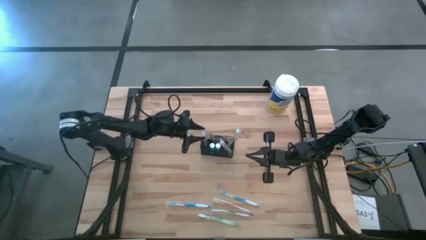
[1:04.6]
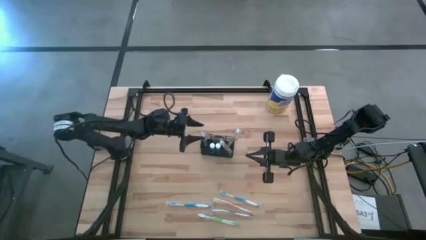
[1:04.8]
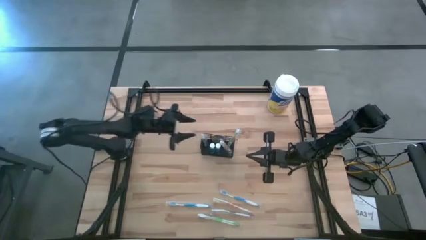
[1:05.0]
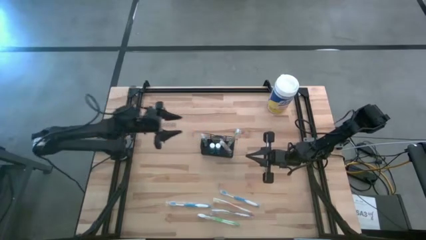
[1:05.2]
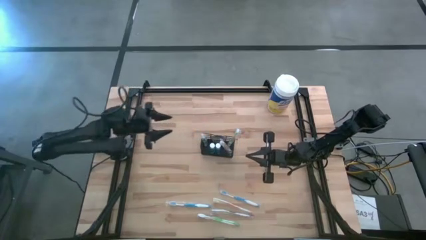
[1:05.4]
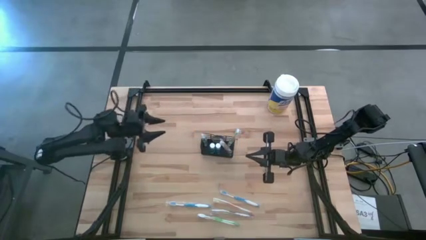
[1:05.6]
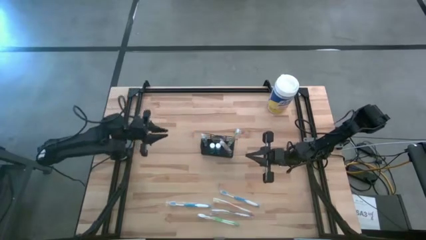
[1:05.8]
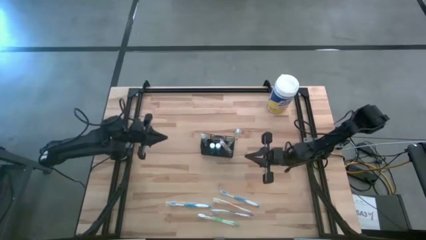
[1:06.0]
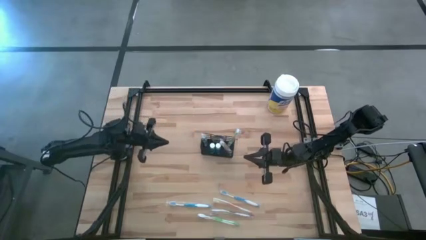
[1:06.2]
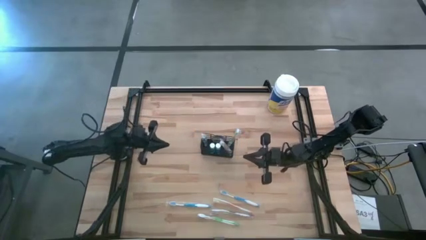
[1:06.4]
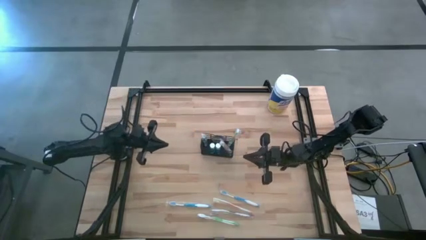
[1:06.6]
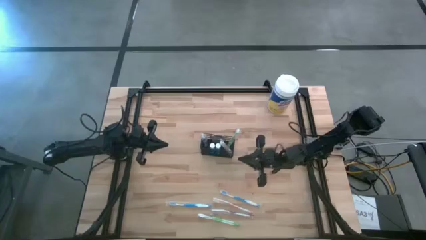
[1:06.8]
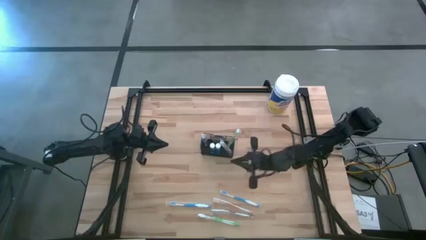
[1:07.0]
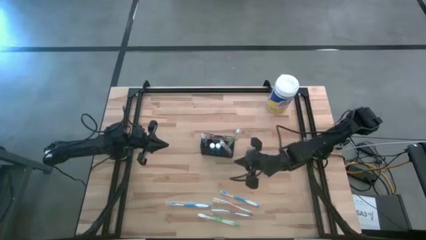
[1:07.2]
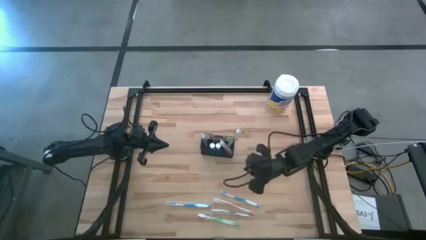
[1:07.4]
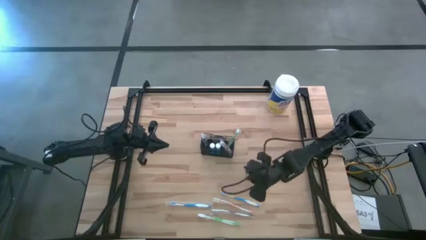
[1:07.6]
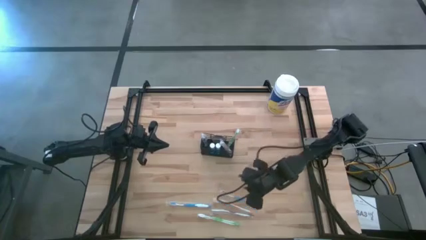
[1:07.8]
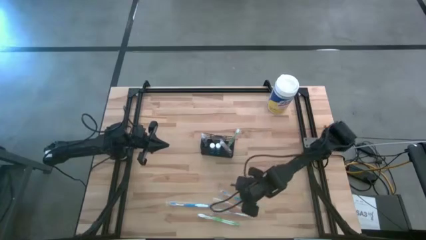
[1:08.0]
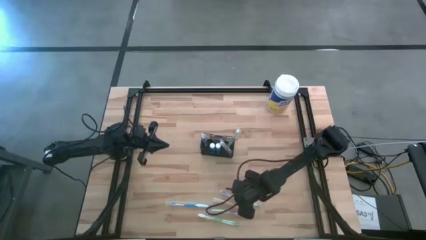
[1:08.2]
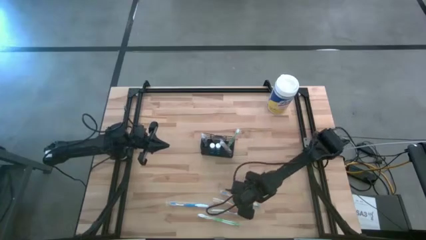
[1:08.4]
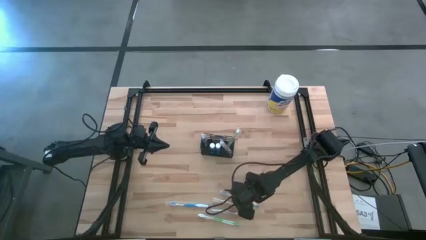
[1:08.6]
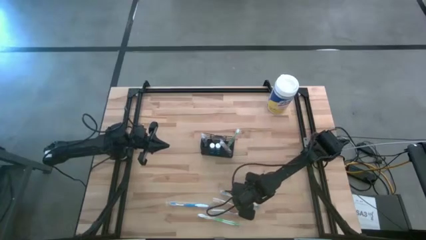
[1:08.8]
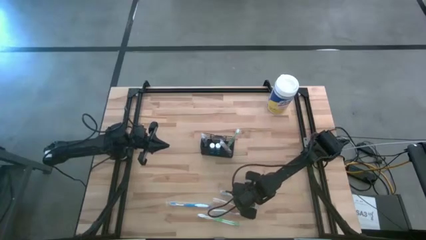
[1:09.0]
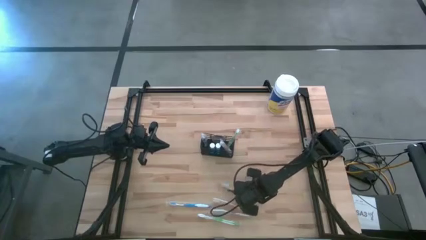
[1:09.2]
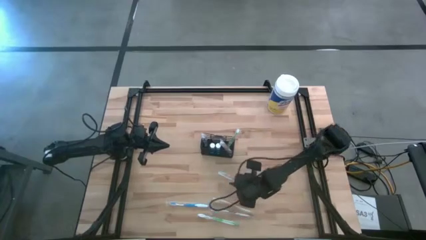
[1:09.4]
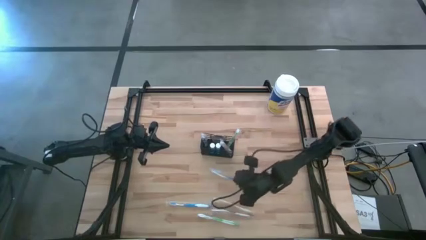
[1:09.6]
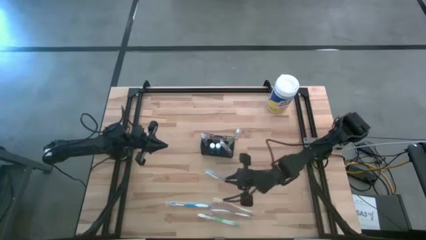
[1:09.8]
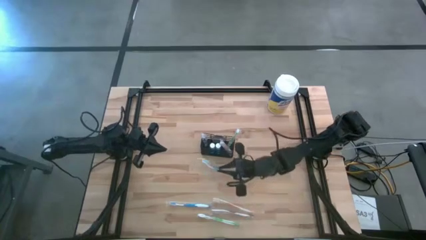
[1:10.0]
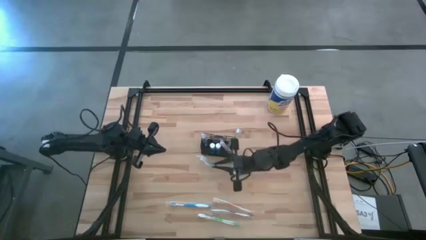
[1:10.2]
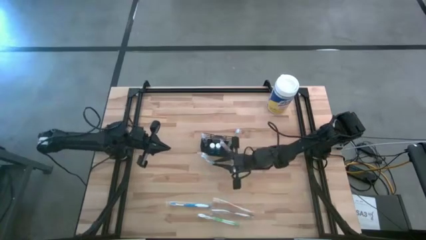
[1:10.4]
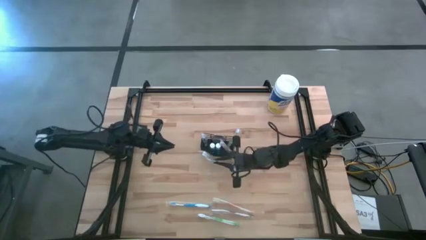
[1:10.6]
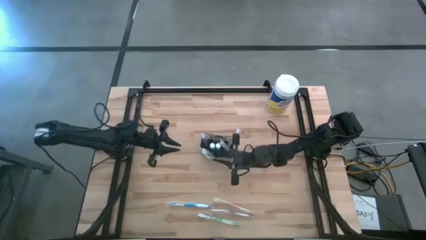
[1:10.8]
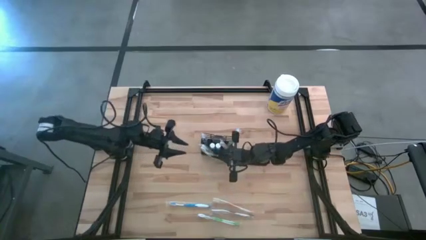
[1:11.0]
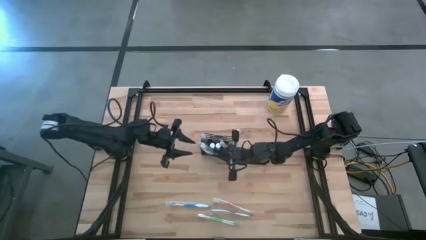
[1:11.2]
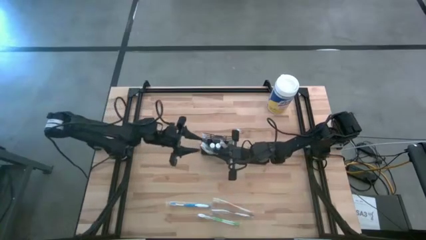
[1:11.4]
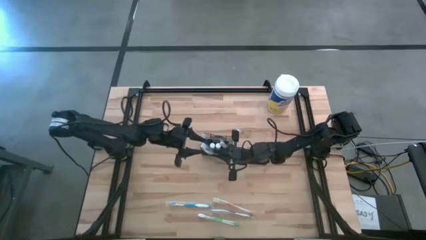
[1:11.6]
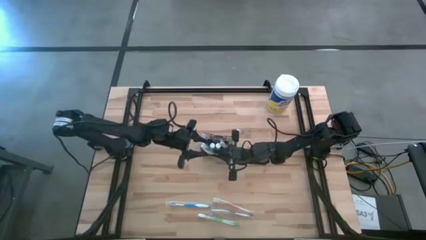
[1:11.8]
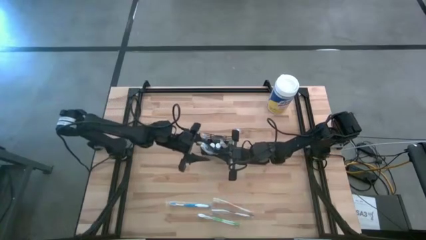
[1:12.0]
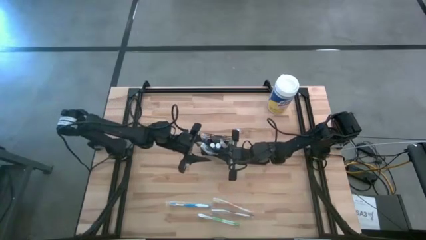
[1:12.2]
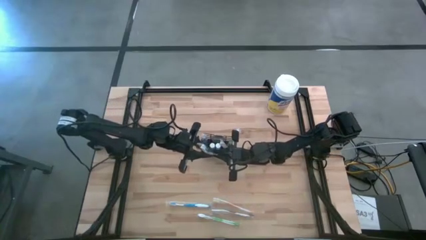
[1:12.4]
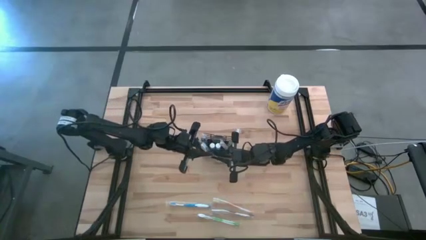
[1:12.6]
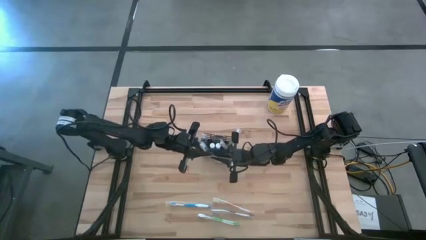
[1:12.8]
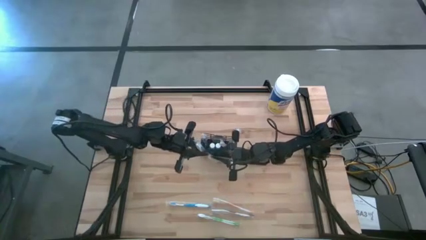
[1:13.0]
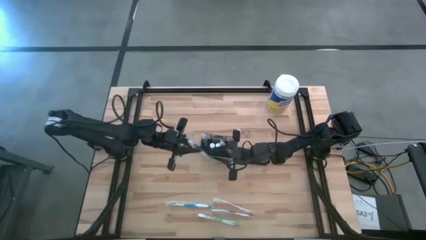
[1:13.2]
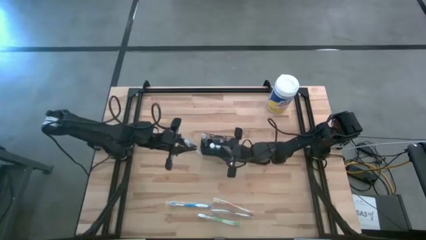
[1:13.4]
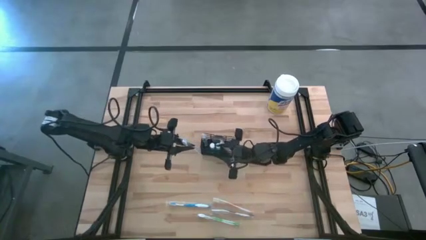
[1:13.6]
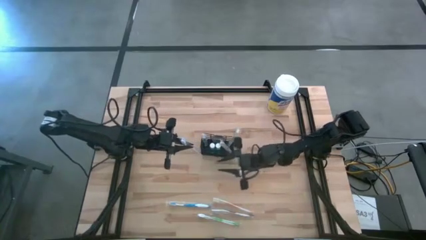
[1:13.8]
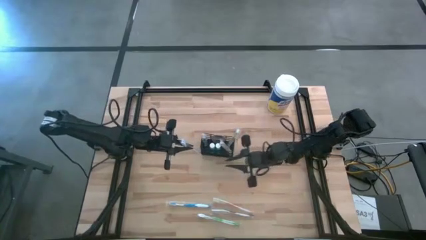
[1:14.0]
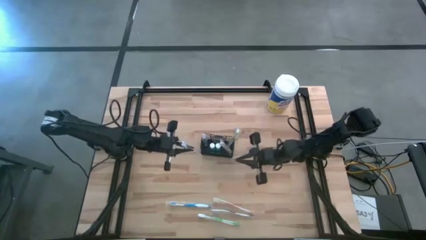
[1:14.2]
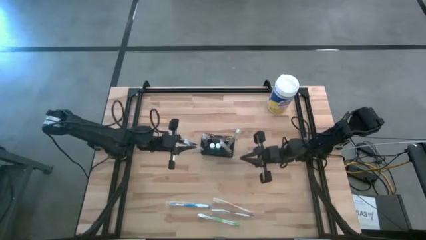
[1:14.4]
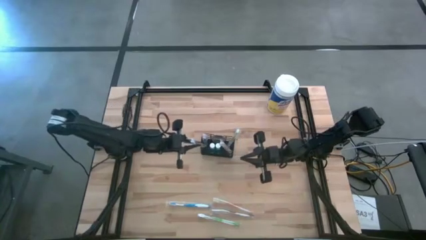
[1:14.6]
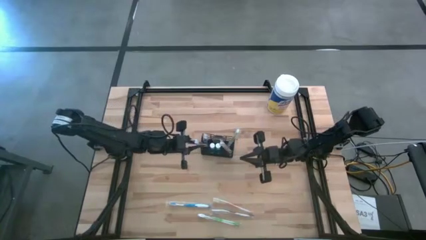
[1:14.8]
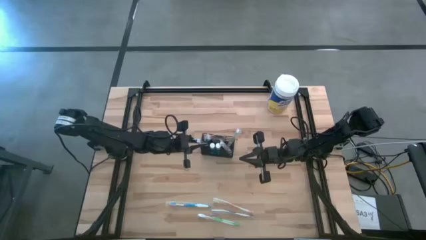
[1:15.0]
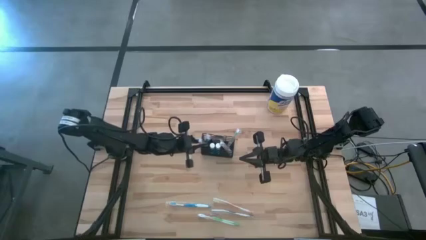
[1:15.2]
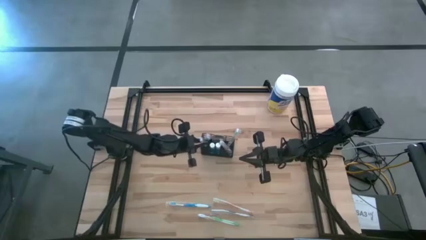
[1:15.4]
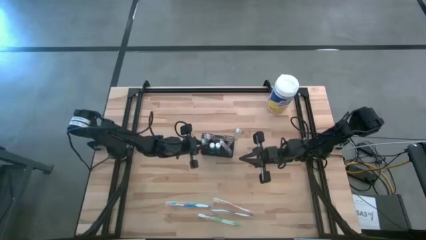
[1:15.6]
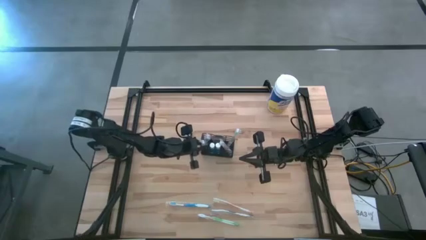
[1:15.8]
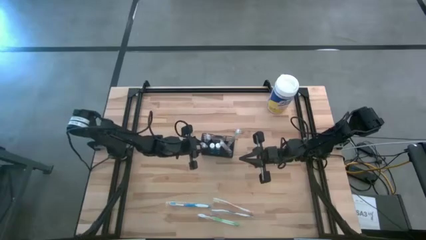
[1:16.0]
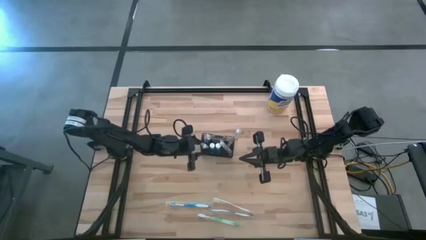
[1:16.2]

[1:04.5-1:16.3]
Task: Pick & Place toothbrushing station
Put the top blue toothbrush into the wire organizer

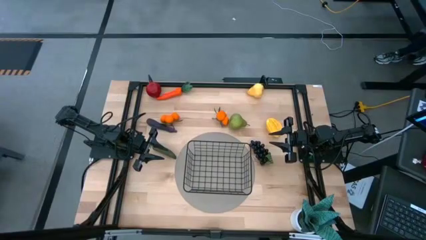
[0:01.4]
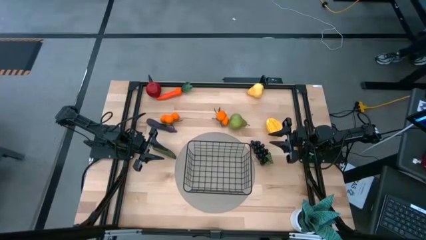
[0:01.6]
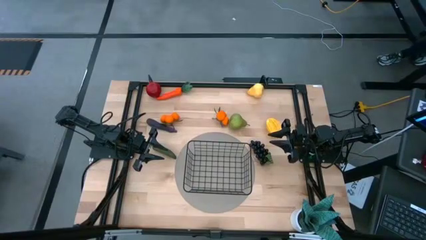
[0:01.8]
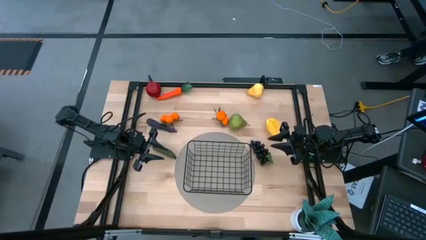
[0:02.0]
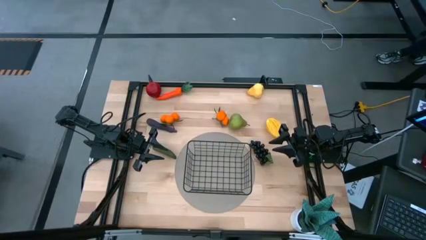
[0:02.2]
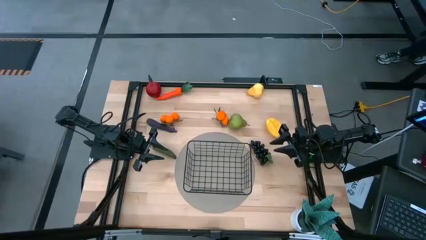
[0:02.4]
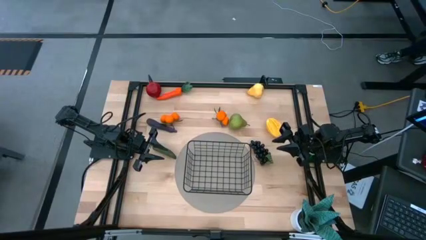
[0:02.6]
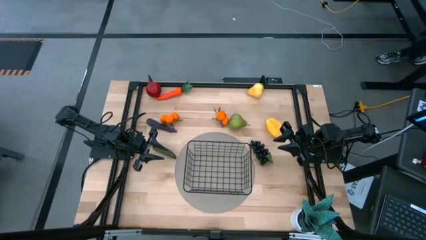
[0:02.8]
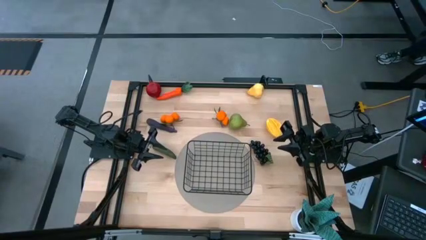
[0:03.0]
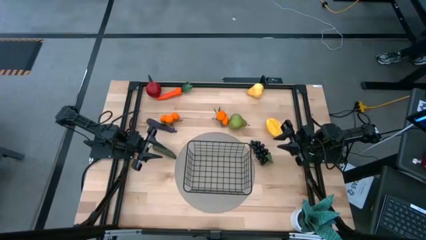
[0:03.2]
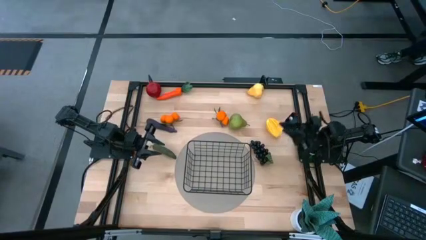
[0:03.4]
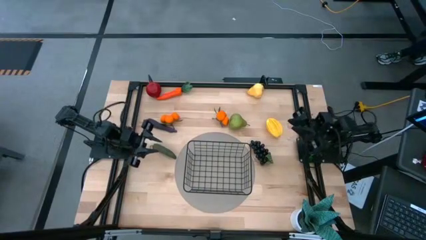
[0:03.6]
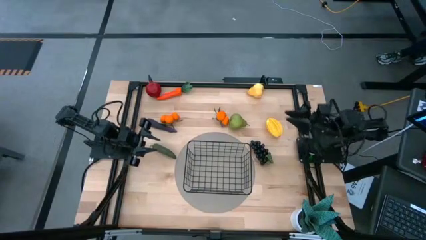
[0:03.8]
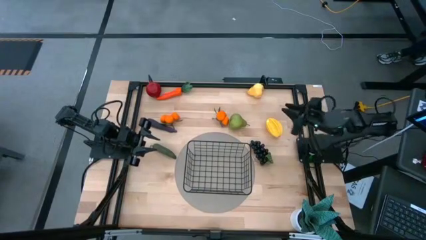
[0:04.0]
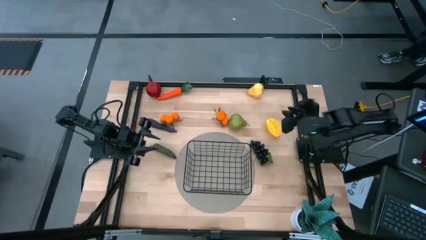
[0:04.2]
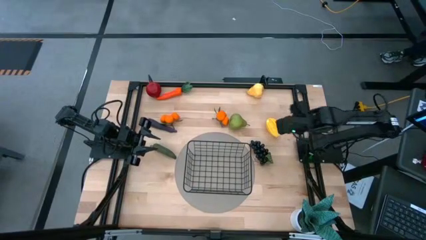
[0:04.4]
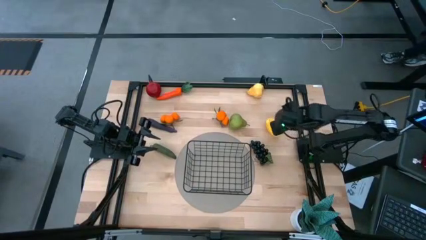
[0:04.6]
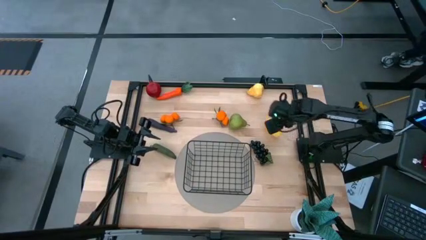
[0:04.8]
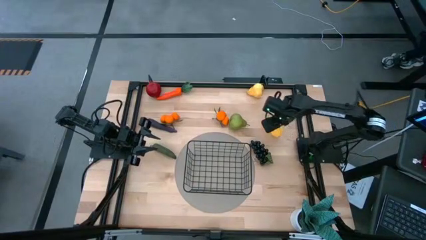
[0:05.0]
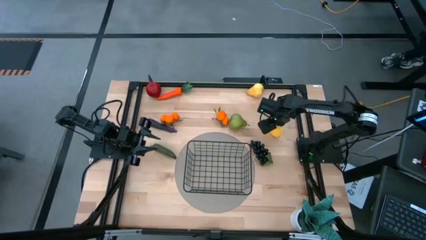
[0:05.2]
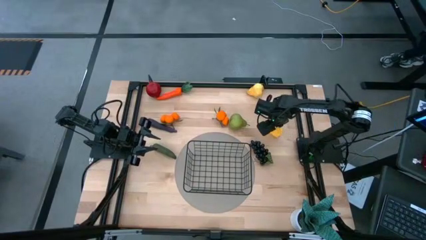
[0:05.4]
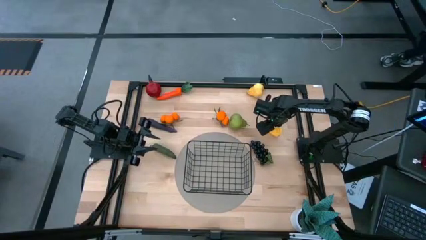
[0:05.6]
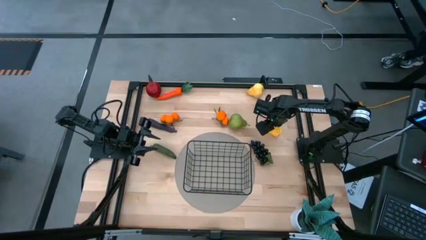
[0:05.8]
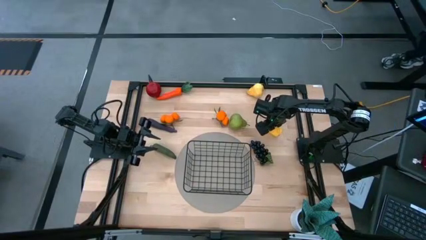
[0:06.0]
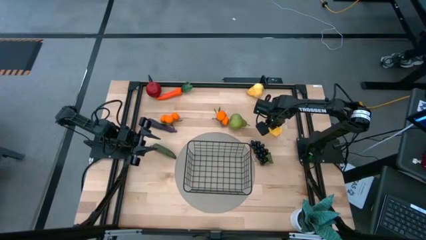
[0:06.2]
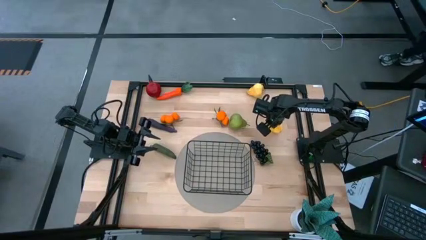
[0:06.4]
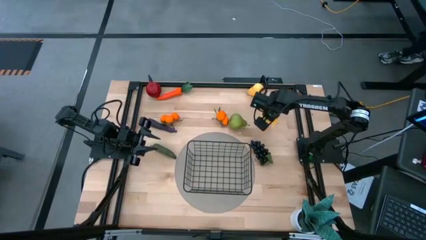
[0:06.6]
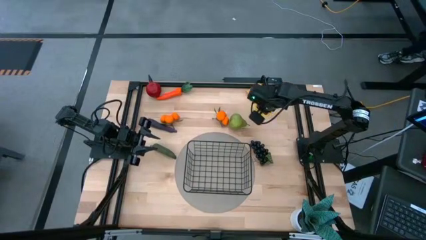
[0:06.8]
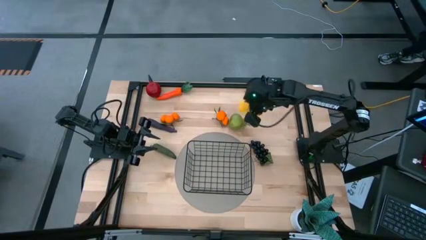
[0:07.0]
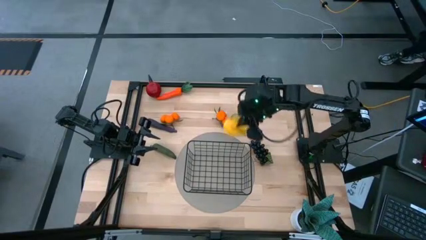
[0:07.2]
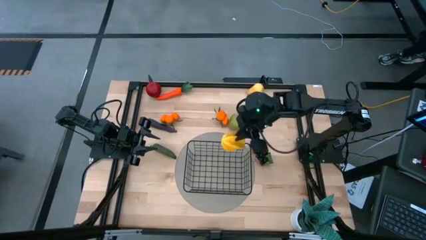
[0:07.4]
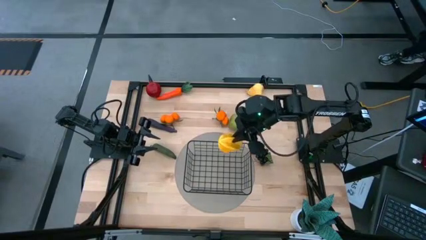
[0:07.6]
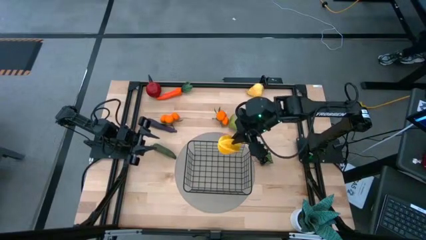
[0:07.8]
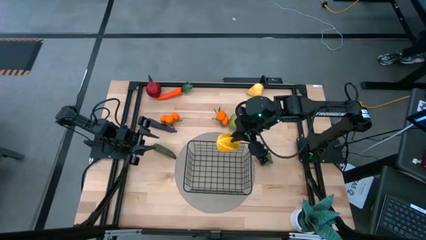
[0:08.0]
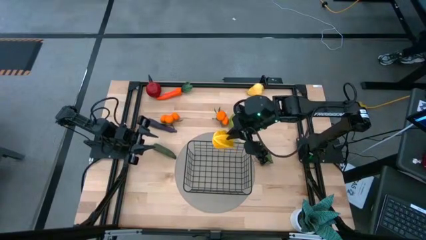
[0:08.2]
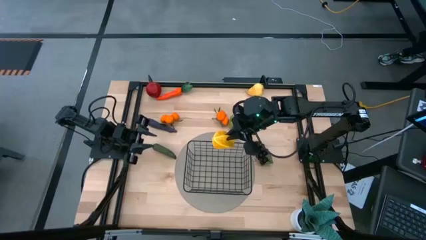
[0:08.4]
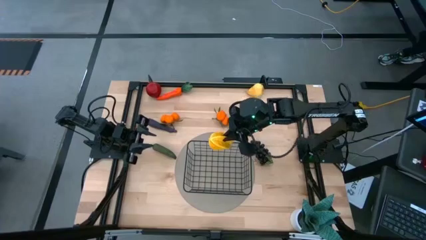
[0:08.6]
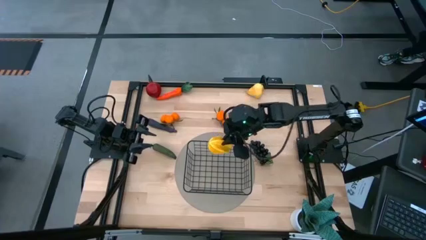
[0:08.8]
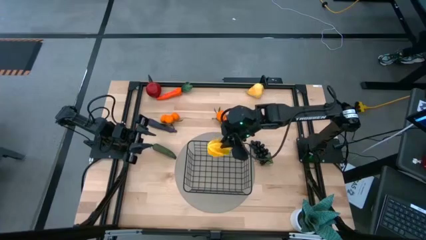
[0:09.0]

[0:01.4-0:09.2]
Task: Build produce basket
Put starfruit into the wire basket
